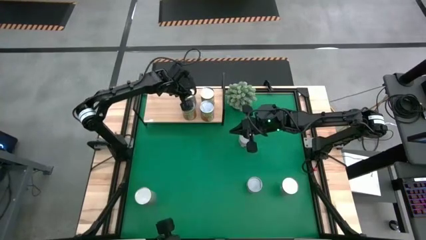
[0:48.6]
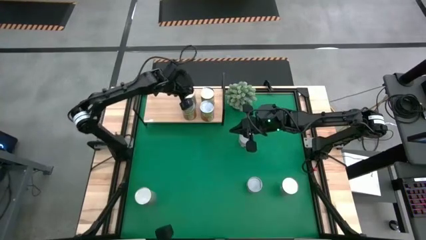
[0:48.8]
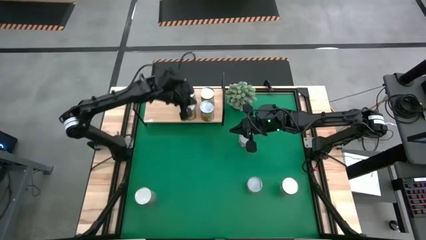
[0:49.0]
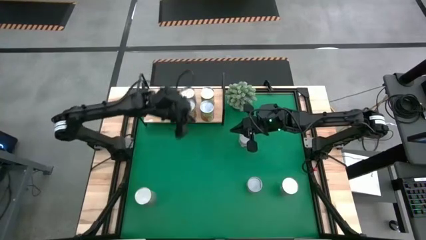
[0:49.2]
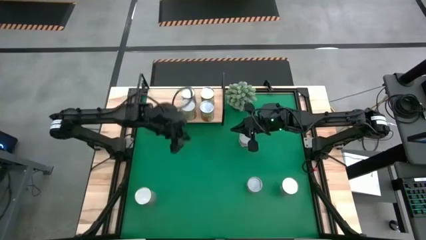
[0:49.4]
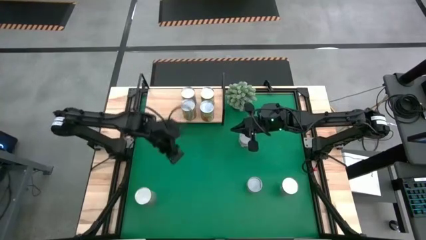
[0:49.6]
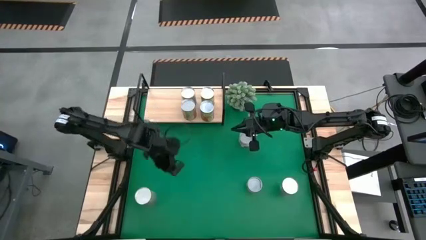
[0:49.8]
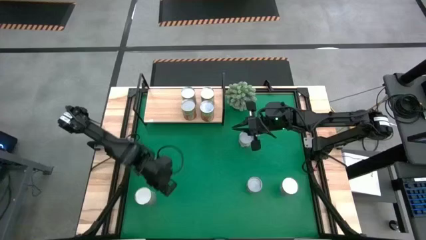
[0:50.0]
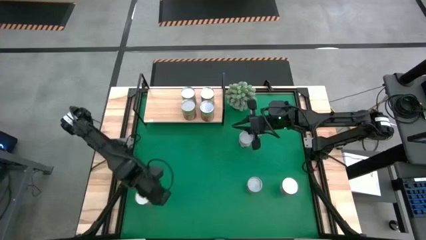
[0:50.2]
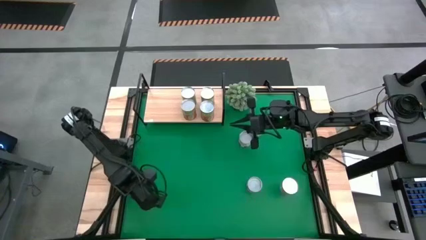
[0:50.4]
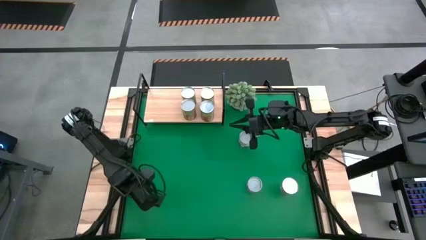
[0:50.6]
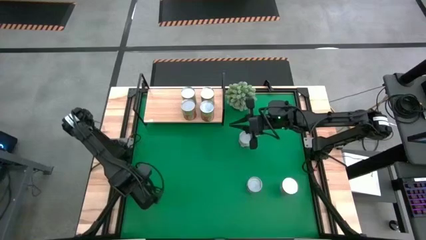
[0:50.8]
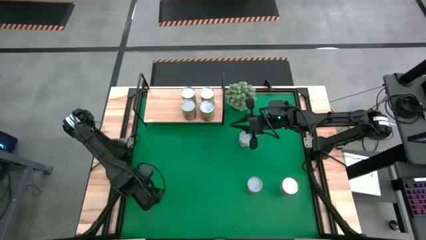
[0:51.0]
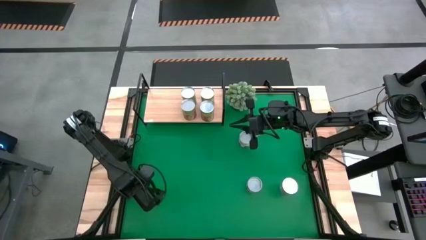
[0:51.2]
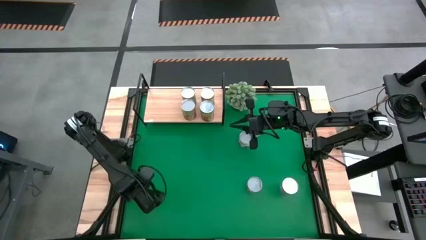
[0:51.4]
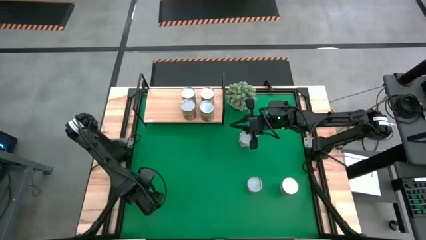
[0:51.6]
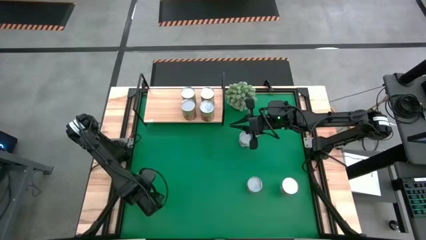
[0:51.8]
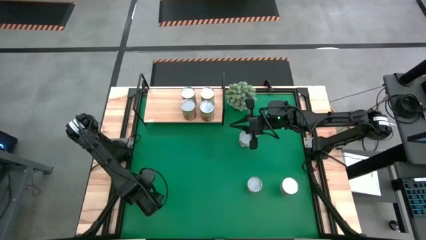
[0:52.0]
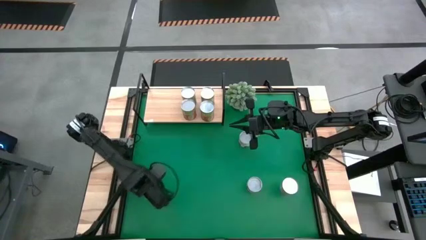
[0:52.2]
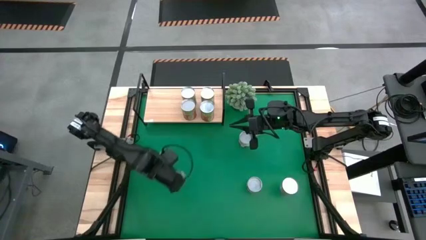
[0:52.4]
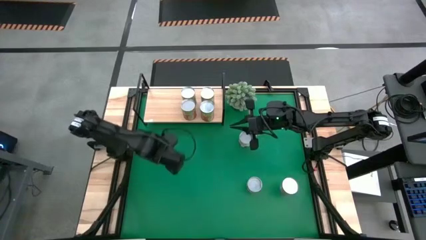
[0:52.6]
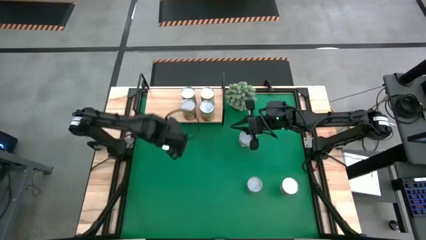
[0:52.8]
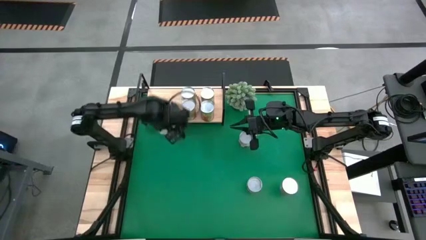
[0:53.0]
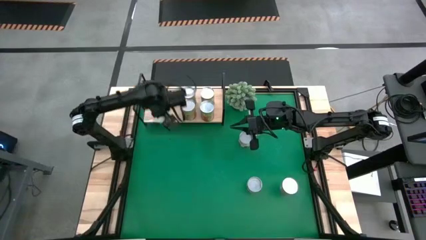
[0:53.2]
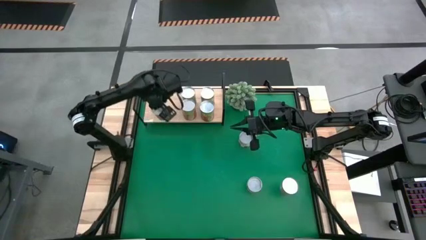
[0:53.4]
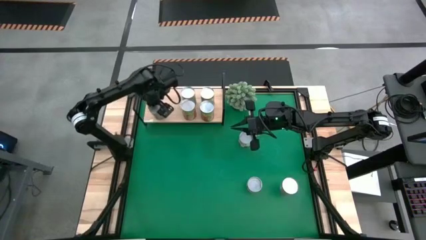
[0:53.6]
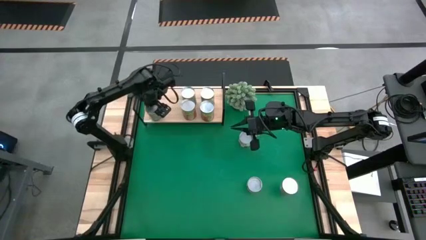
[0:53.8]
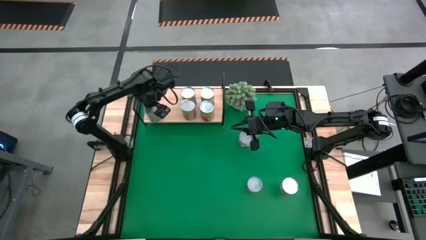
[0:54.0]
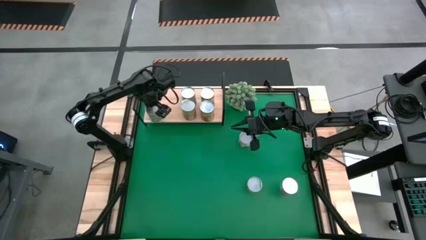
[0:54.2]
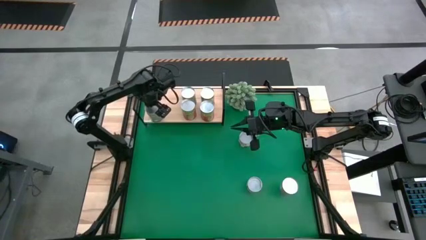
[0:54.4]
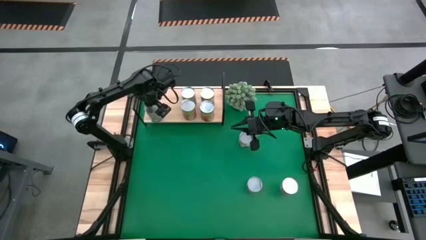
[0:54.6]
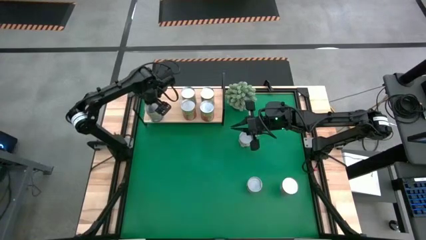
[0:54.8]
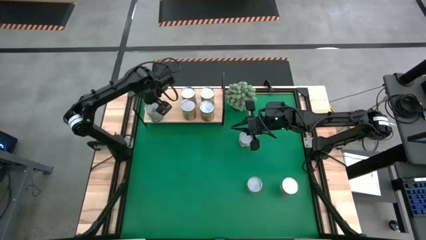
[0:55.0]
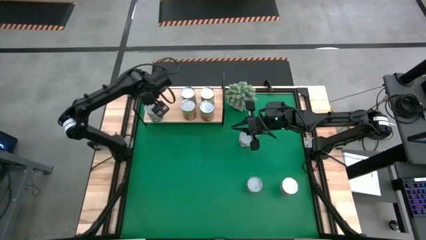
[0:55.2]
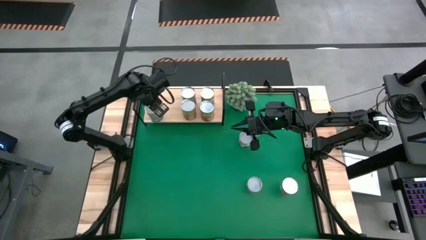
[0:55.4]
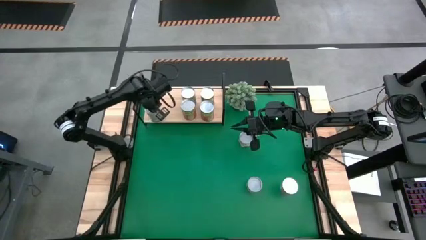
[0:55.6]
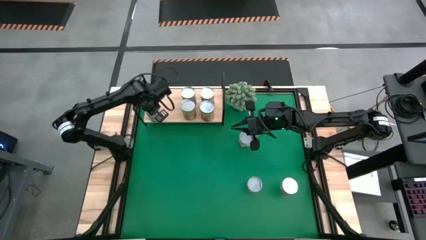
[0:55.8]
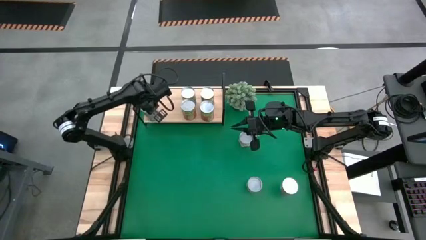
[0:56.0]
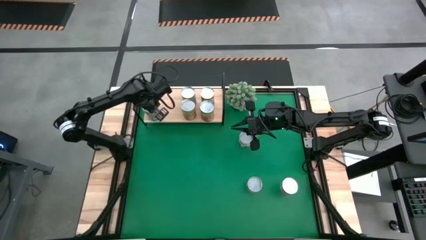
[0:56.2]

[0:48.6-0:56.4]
Task: Pick and place cans onto a shelf
Put the canned peaches on the shelf

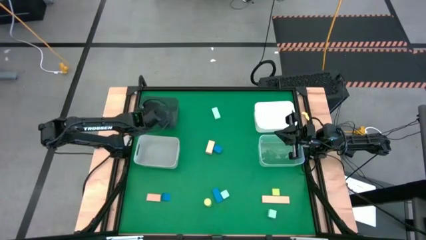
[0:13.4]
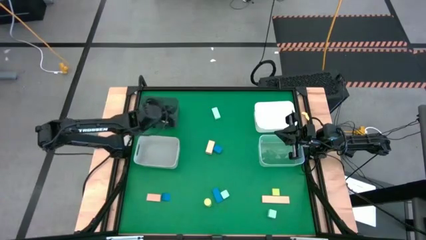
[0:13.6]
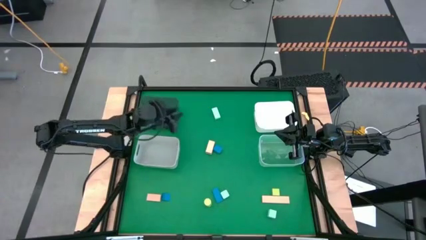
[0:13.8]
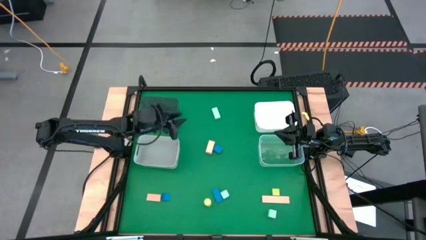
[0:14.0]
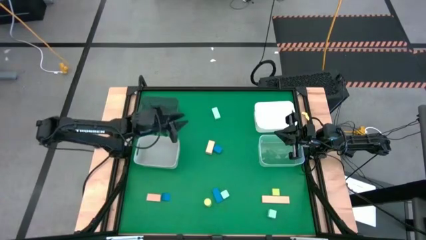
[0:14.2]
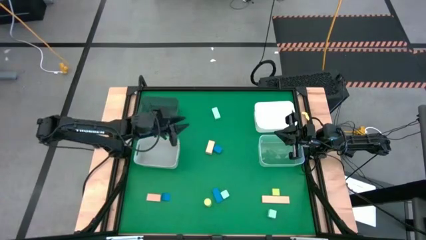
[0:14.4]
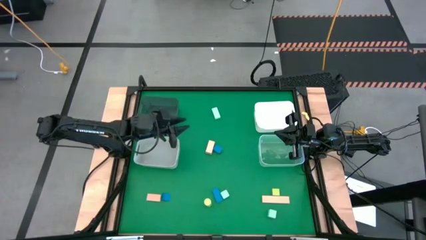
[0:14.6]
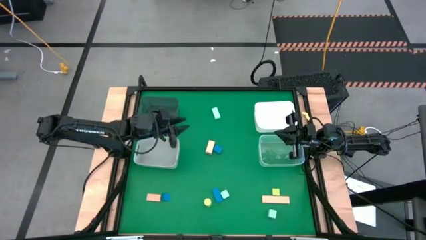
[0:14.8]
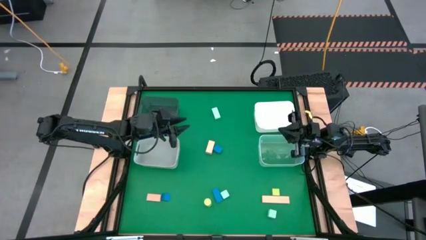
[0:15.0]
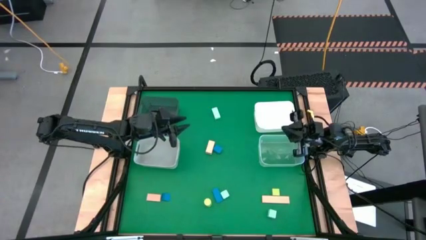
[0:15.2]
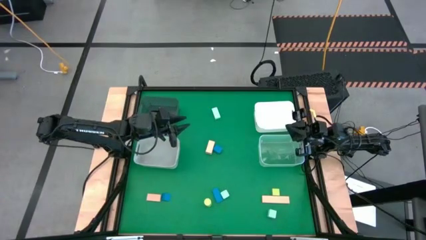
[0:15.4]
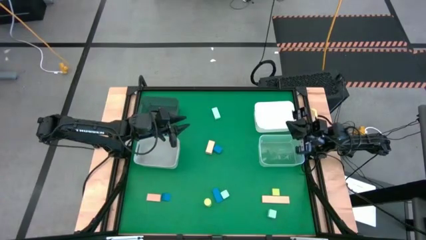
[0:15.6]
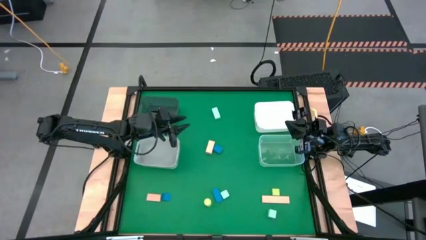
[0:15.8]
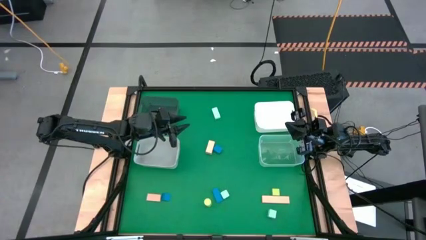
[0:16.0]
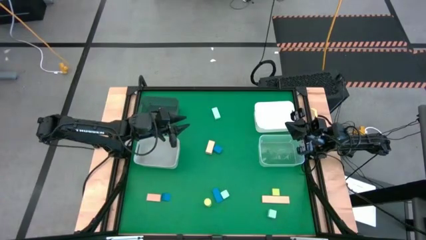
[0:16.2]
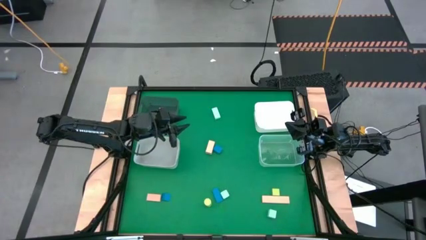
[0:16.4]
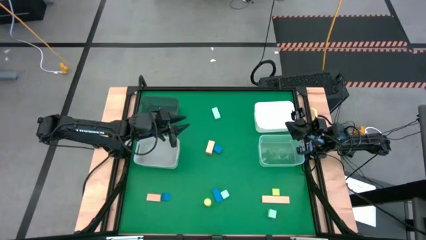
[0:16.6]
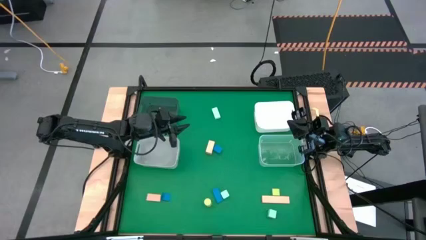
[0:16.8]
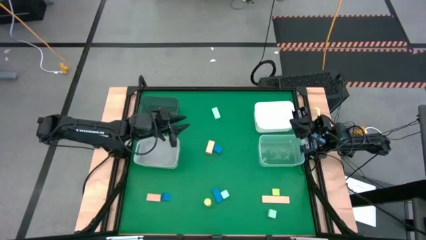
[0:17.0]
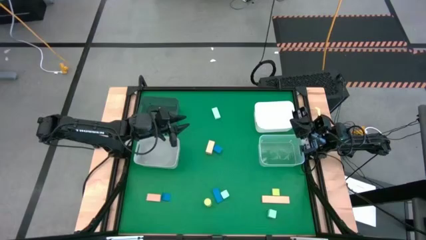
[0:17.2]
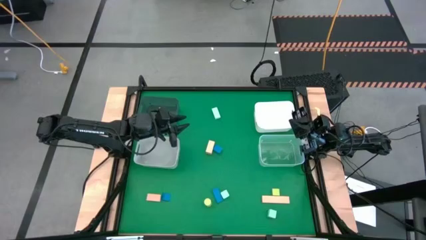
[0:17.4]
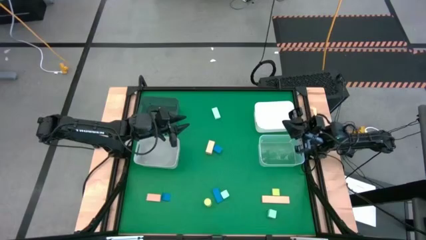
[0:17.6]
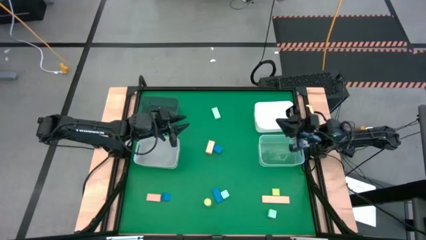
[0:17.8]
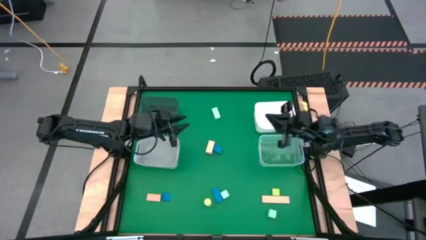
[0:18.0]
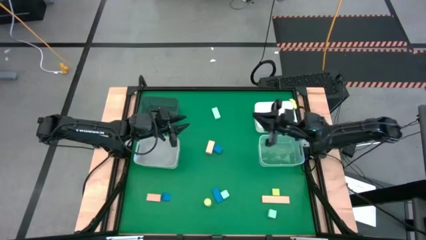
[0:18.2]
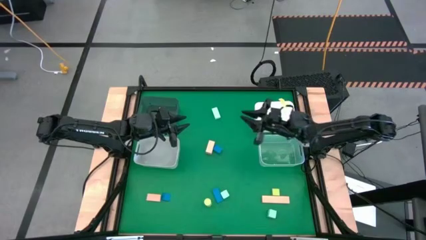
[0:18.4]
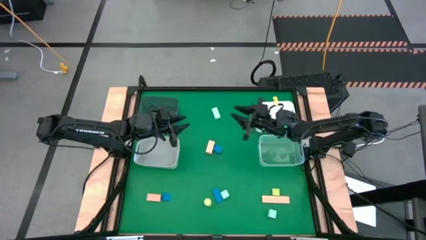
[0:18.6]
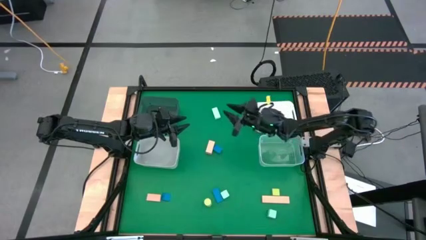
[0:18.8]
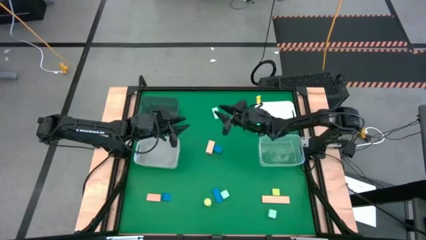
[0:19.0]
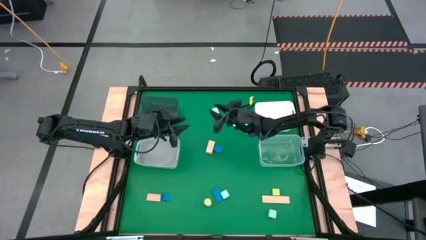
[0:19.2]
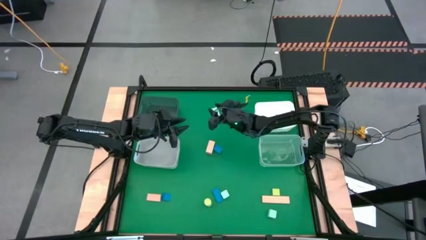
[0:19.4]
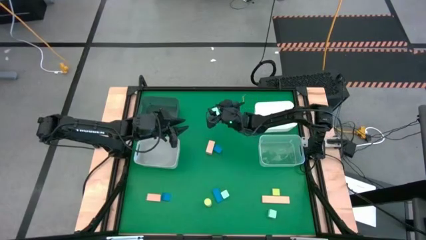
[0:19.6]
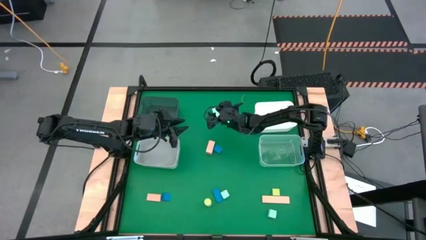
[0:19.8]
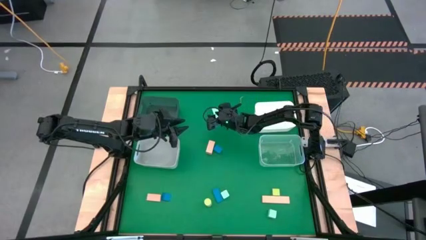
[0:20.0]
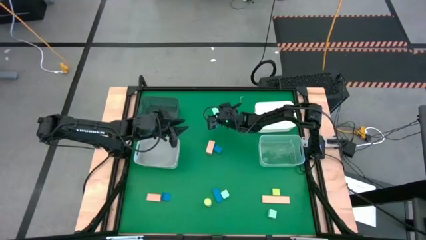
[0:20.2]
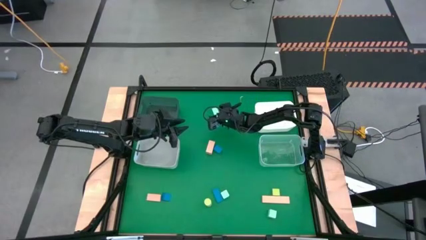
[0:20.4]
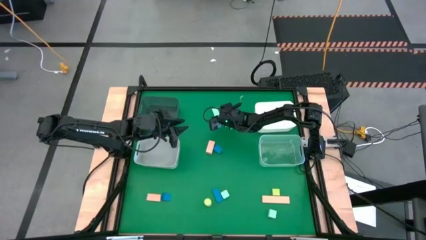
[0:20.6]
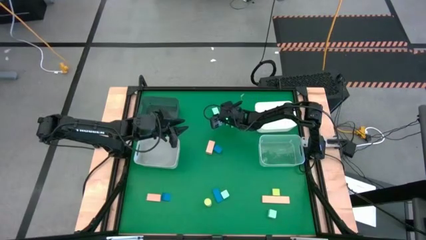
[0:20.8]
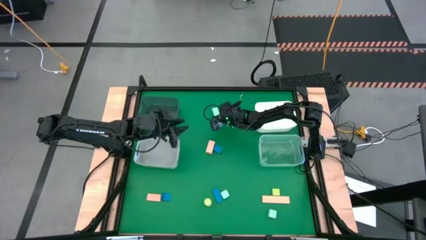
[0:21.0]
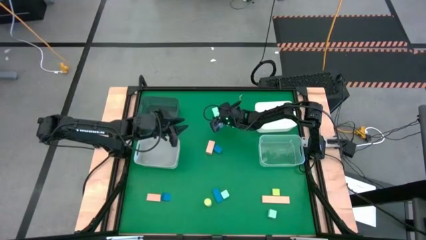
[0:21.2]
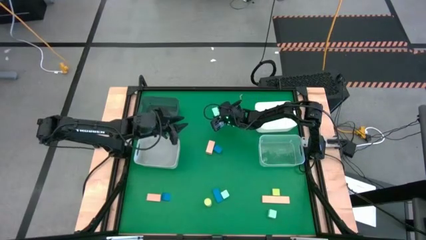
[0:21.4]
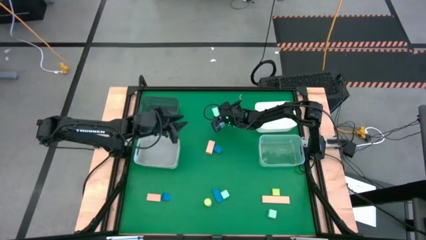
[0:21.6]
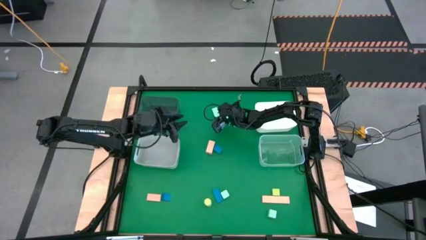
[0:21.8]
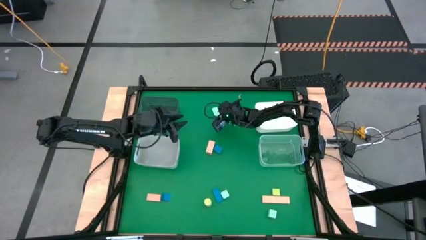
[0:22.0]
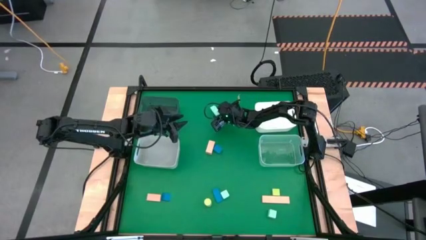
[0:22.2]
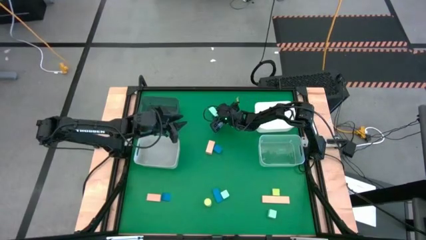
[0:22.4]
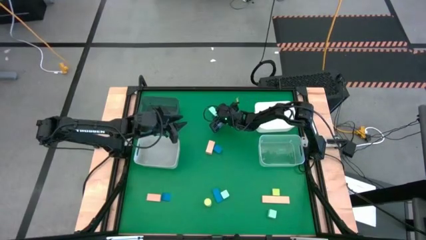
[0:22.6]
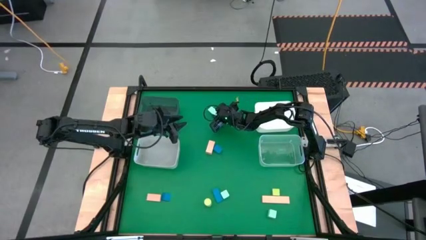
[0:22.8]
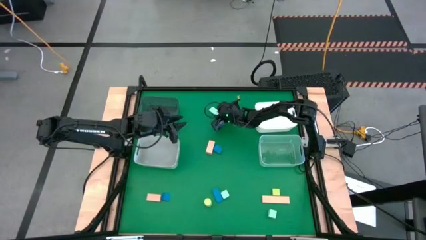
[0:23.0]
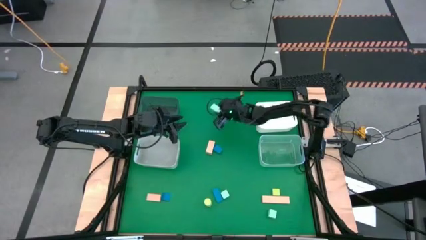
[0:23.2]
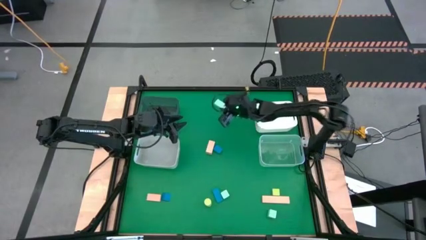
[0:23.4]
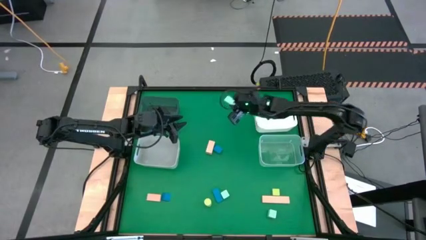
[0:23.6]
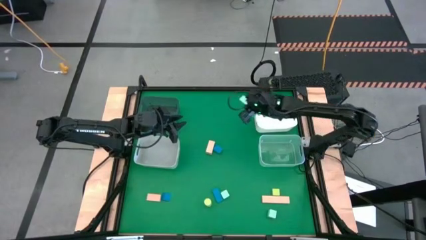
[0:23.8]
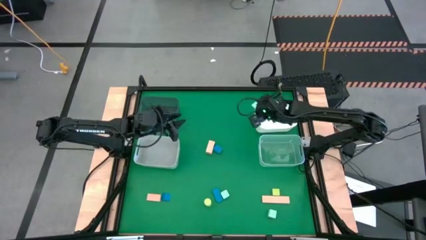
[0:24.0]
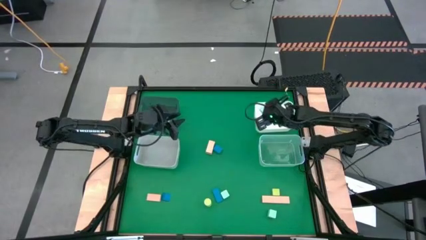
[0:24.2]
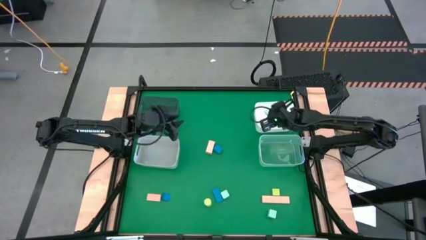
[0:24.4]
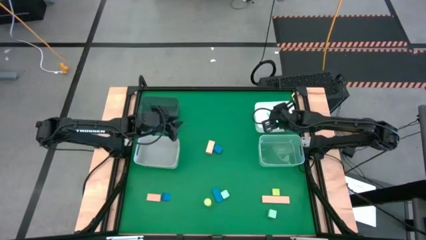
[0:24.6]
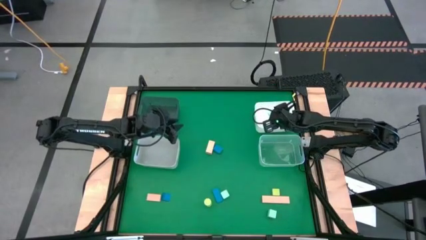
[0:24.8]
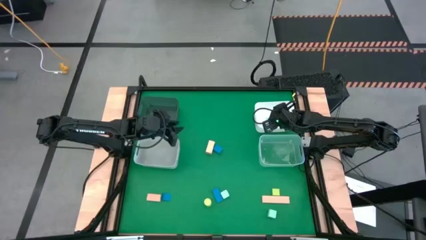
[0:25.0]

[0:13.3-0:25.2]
Task: Sort & place blocks by color
Put the white rectangular block into the white bin
